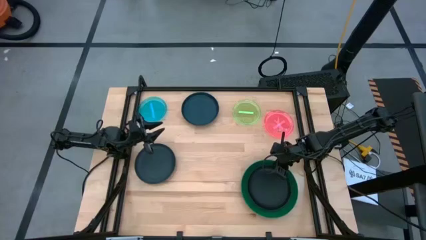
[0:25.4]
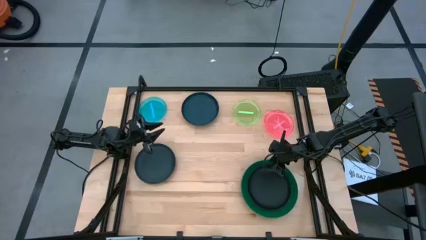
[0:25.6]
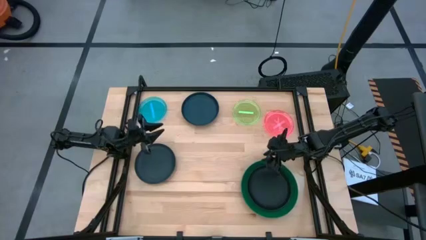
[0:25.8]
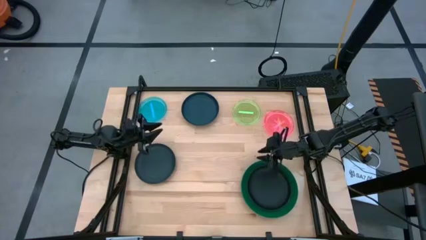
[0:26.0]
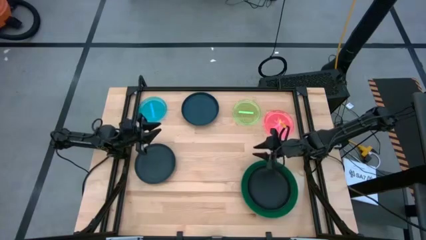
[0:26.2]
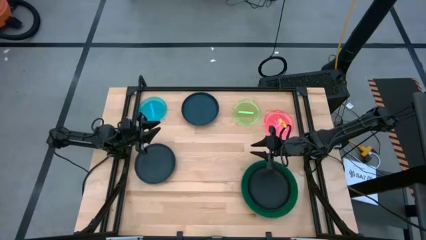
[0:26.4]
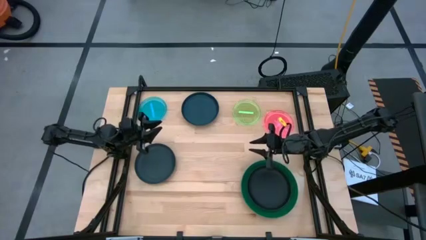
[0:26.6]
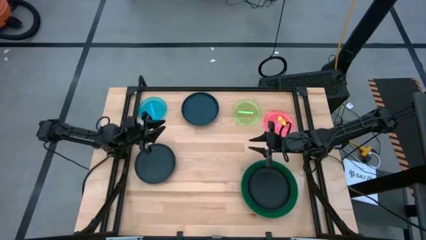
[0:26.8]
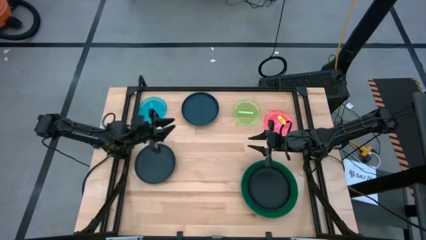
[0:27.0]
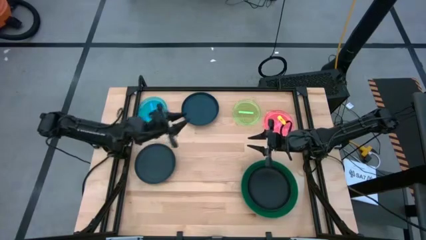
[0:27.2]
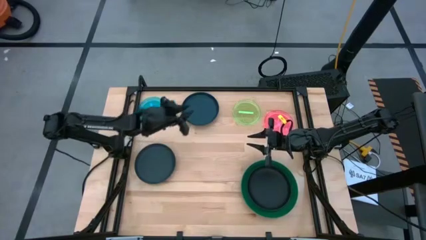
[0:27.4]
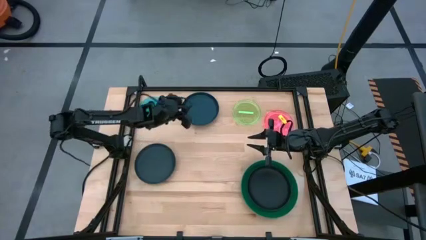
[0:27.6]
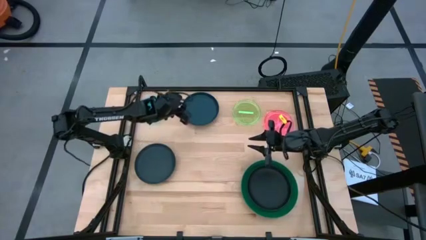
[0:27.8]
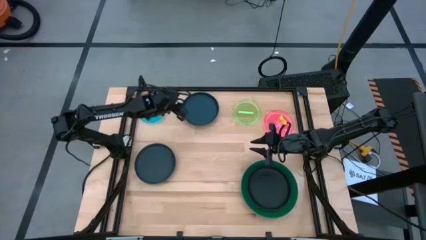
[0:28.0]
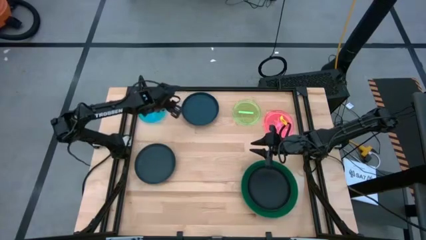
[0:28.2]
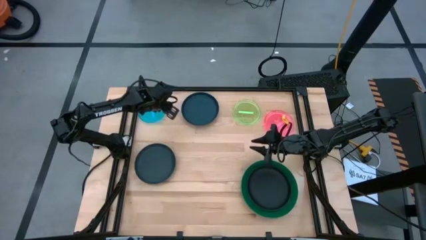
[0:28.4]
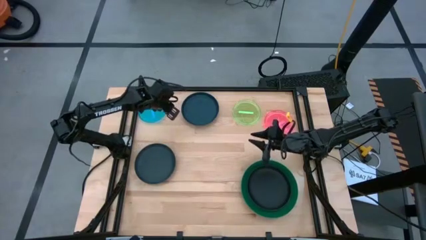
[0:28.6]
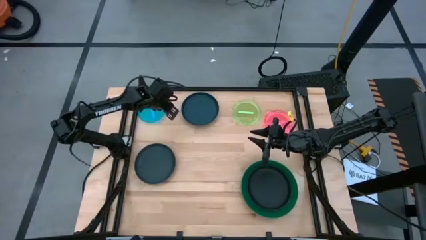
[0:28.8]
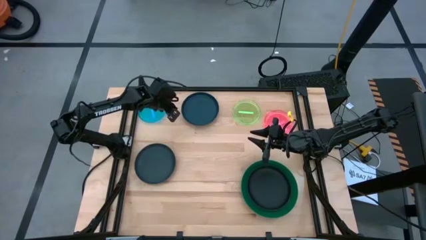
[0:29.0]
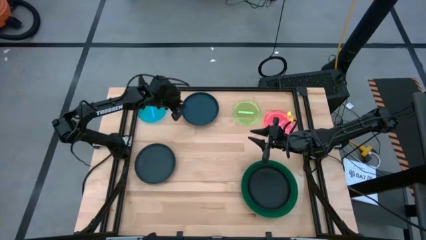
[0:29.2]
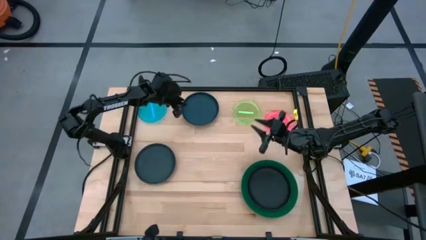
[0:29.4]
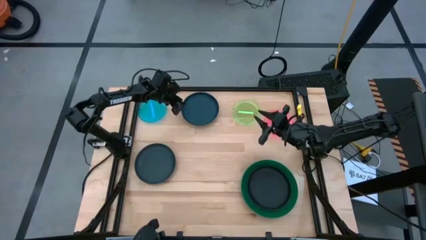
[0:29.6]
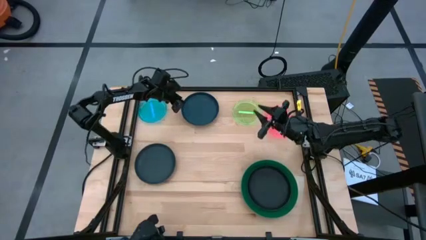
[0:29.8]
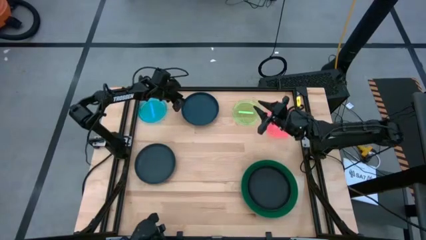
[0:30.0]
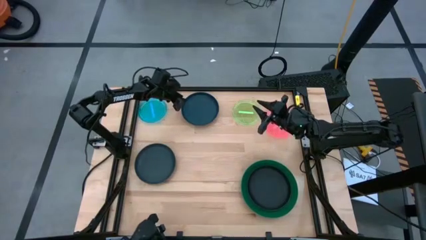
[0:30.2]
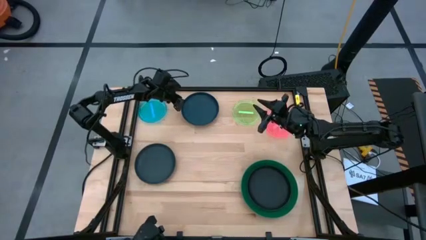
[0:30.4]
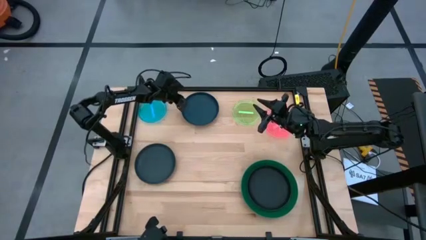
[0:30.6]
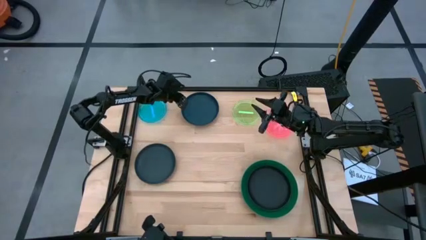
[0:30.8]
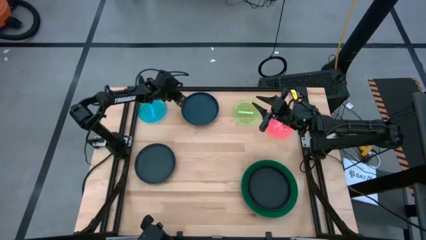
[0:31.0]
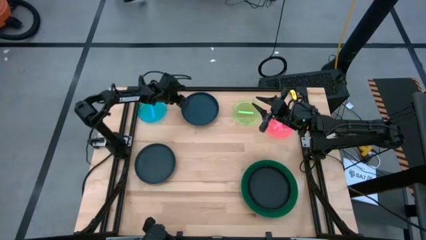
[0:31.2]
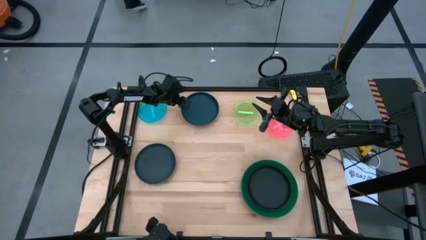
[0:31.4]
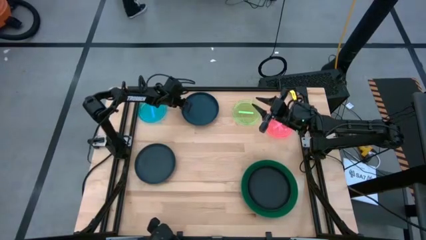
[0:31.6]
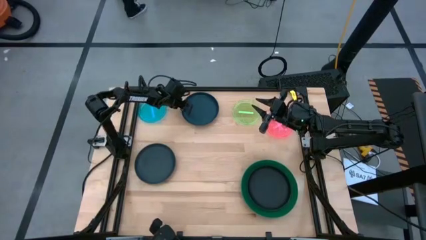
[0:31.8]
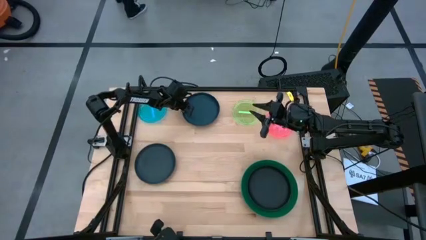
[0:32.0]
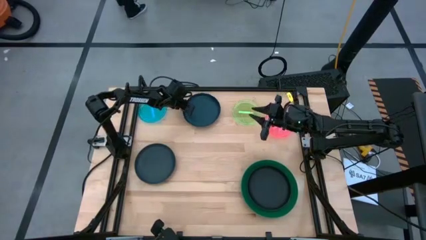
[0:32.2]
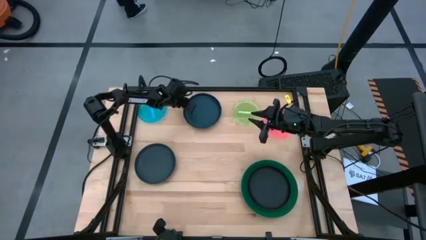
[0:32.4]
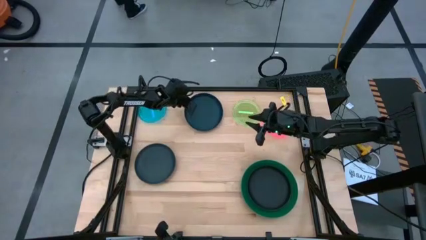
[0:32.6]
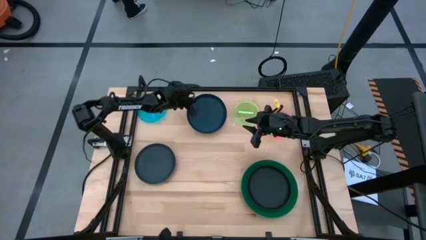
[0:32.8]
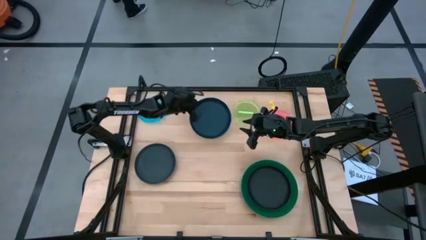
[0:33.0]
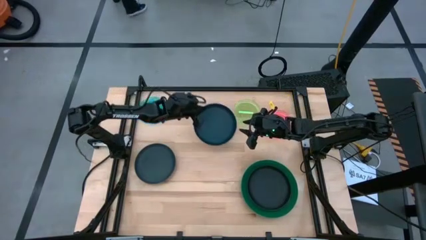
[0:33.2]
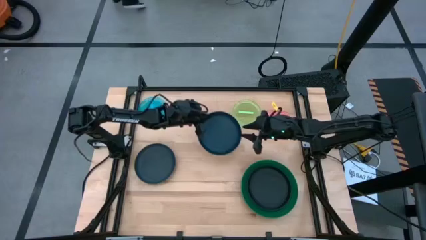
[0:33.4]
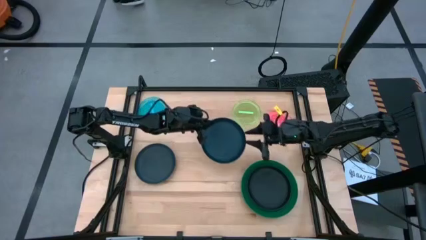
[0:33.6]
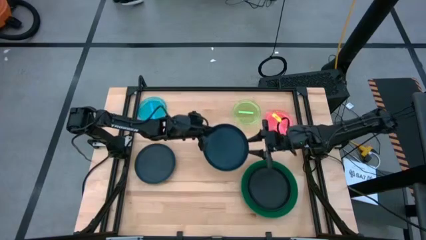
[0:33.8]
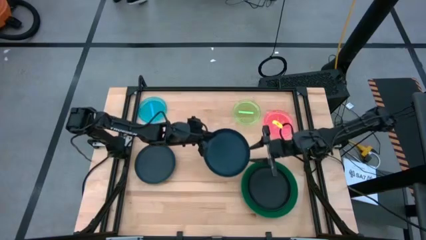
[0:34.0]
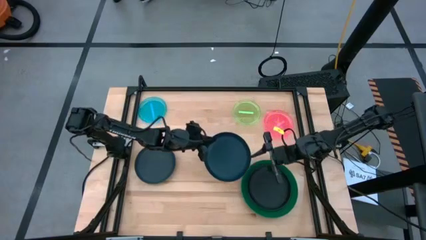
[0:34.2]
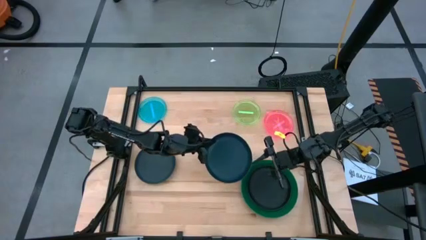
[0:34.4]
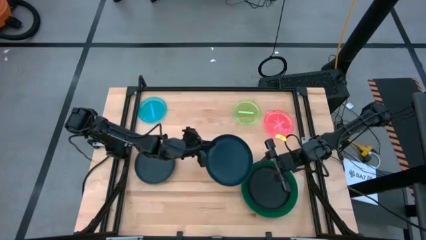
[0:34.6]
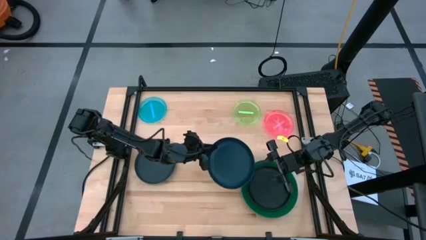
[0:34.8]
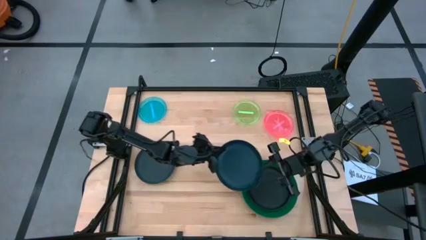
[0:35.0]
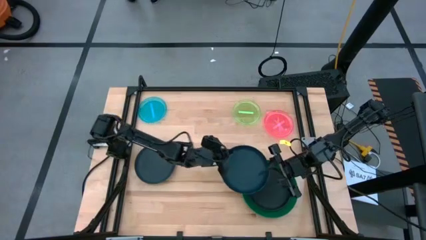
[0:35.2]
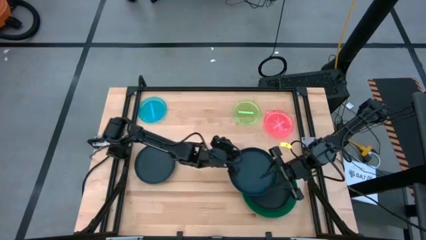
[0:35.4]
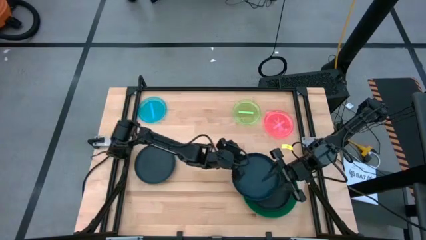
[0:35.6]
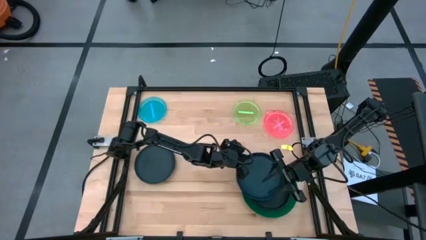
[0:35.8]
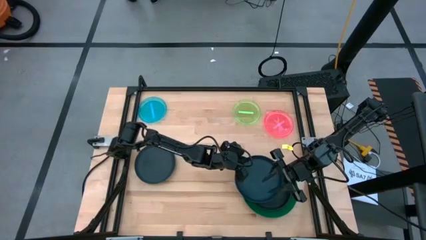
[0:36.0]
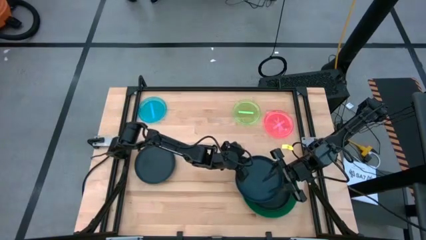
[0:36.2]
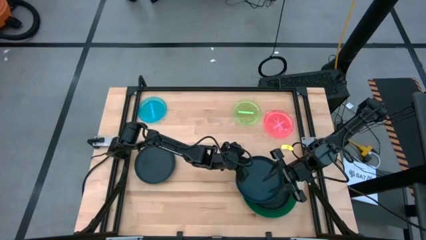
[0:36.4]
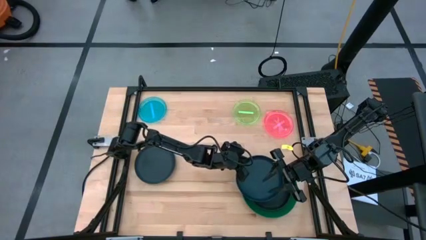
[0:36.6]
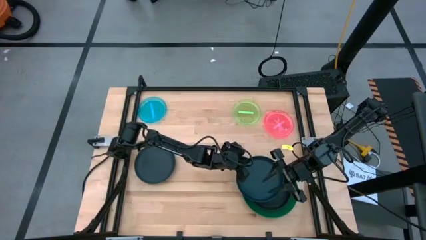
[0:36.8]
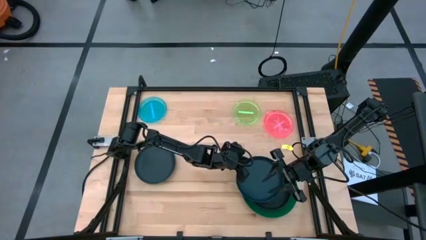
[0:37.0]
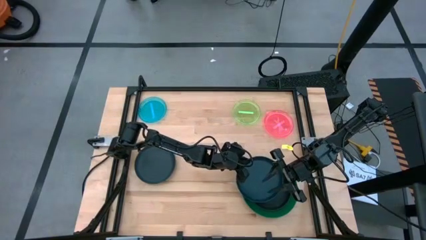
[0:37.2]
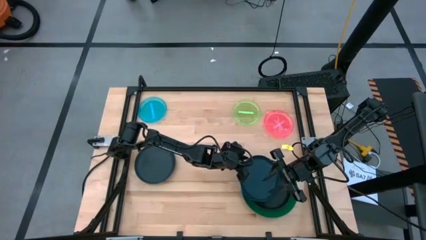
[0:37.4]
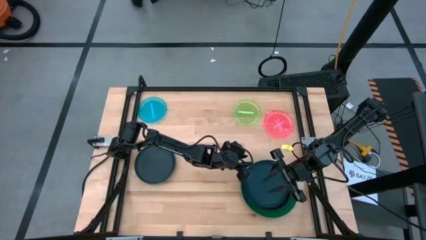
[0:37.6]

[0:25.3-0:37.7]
Task: Stack plastic plates
Stack the top dark blue plate on top of the black plate

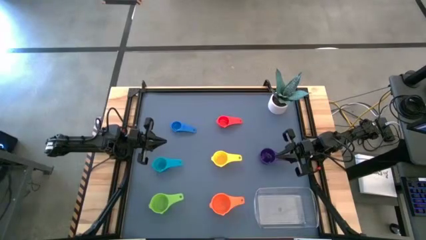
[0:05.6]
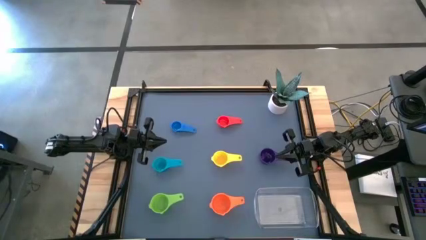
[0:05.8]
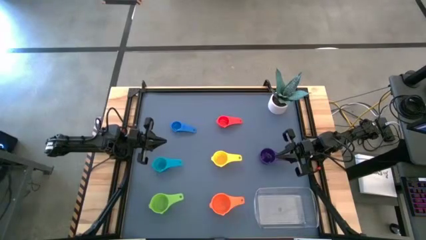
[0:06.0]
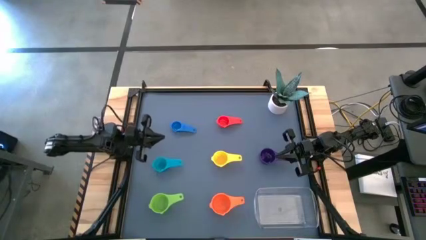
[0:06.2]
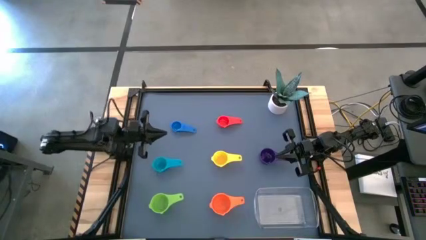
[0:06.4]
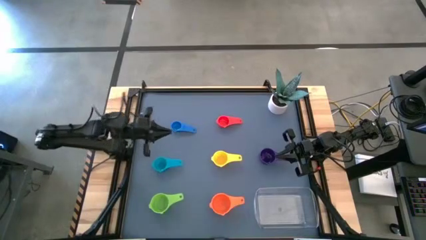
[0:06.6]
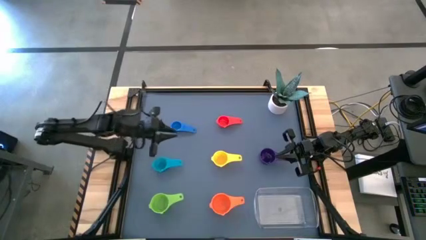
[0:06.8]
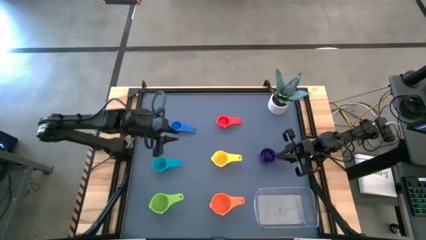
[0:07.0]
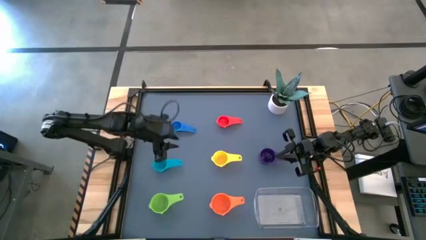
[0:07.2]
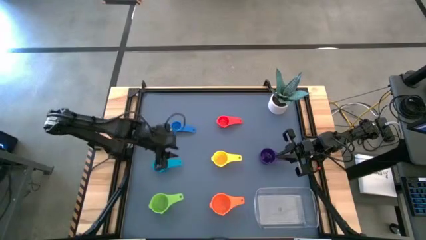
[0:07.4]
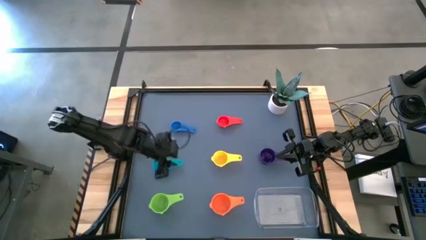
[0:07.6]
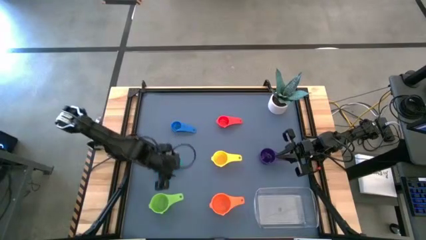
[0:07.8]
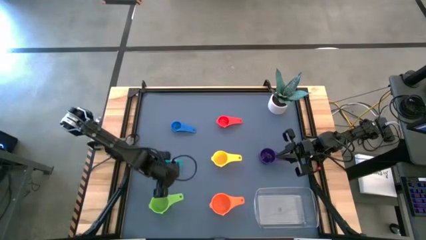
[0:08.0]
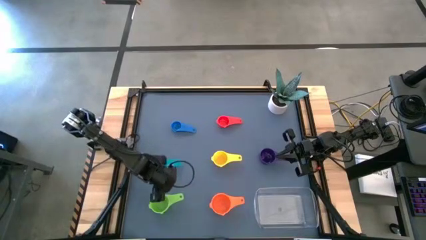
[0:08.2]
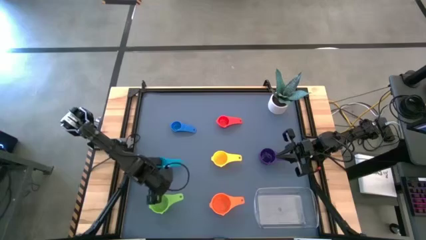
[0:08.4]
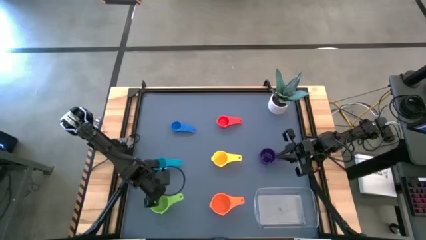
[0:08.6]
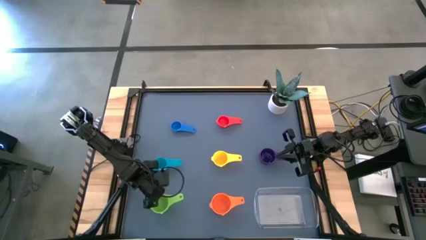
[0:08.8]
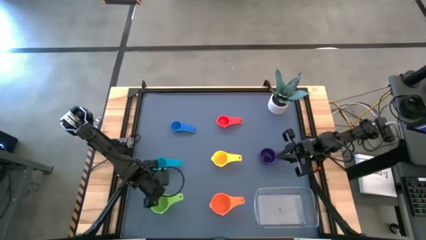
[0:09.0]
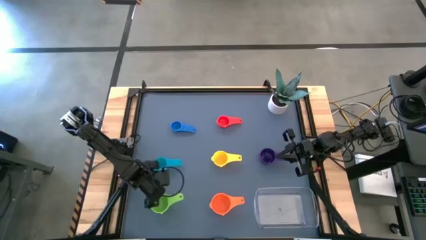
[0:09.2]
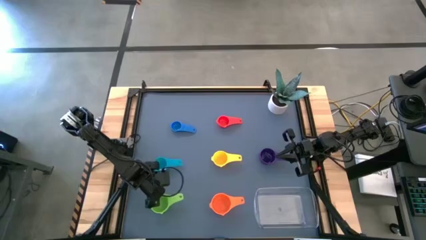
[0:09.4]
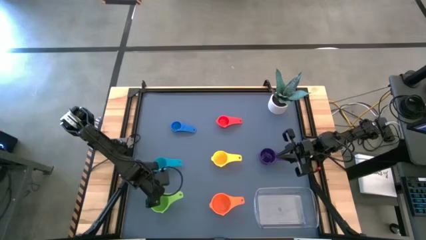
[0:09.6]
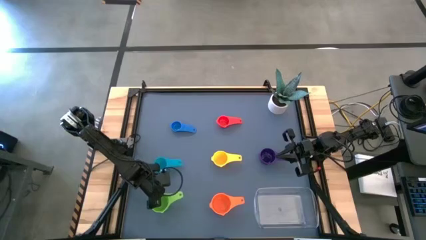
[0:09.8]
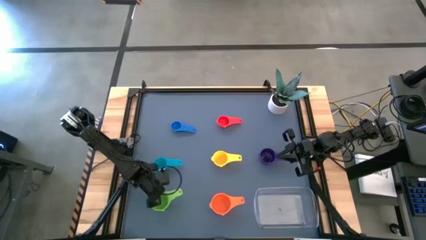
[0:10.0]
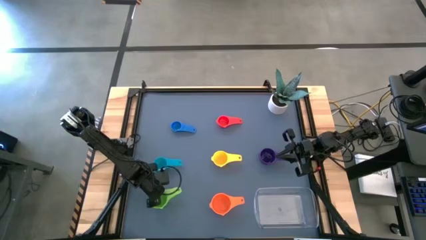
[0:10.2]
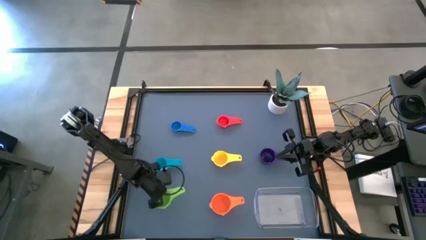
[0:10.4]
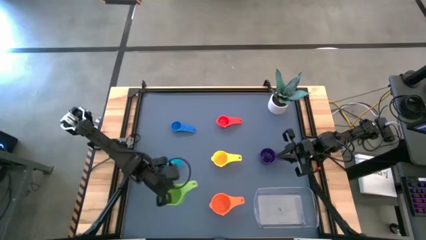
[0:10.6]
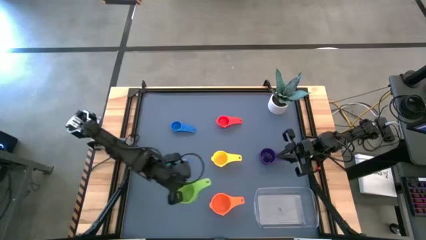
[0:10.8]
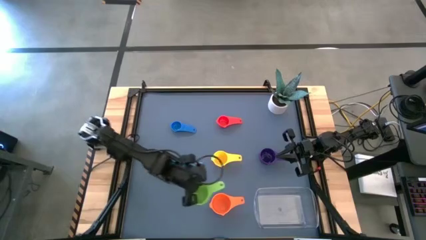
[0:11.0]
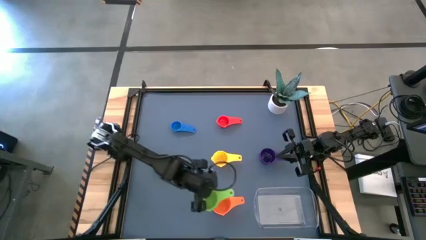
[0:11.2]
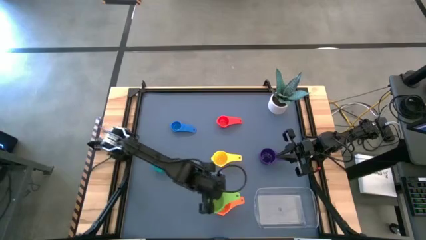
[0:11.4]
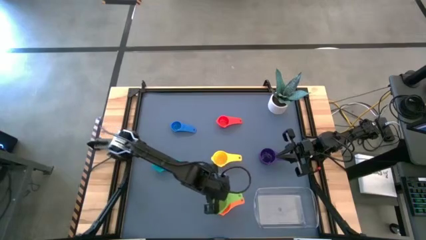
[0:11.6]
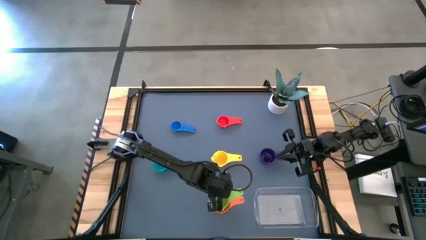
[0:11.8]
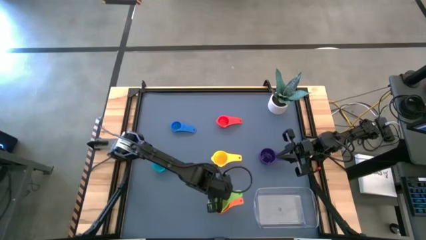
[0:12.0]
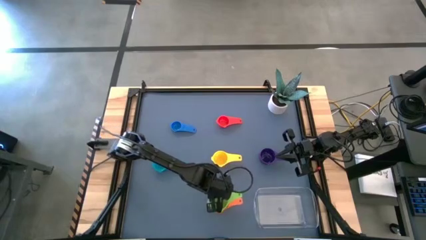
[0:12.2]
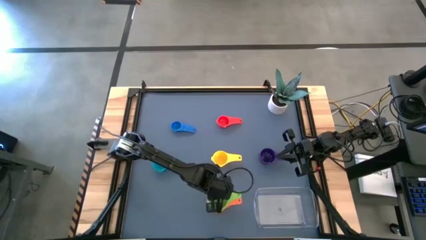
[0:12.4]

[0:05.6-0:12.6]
Task: Nest measuring cups in basket
Stack the green measuring cup on top of the orange measuring cup
